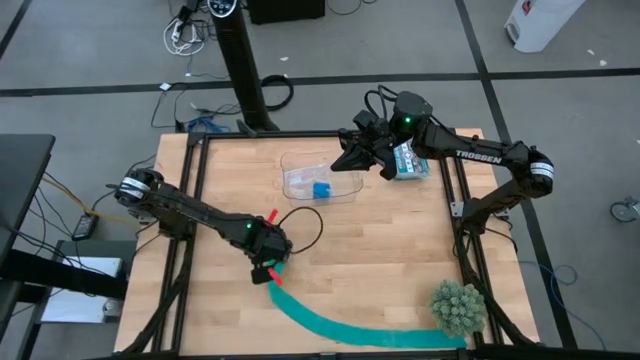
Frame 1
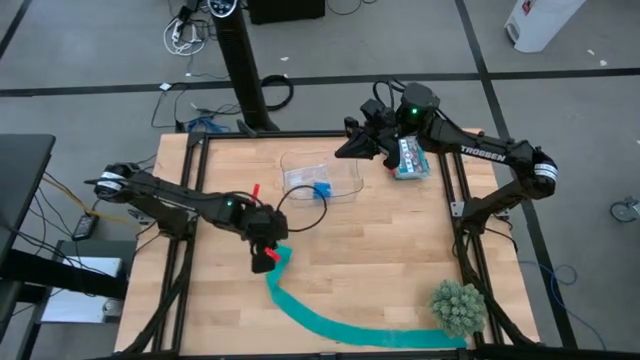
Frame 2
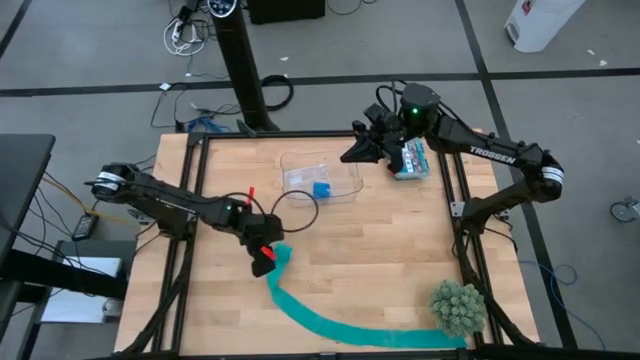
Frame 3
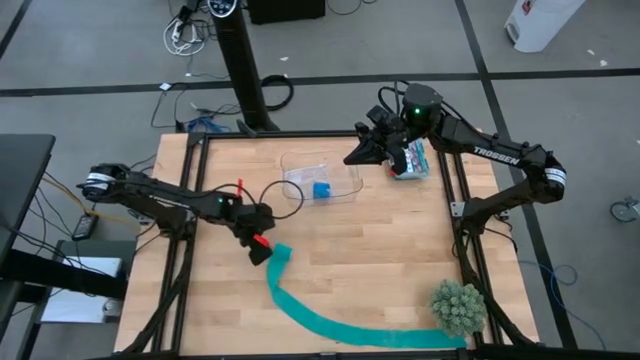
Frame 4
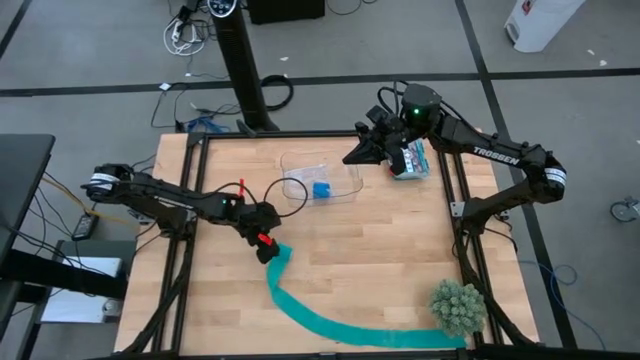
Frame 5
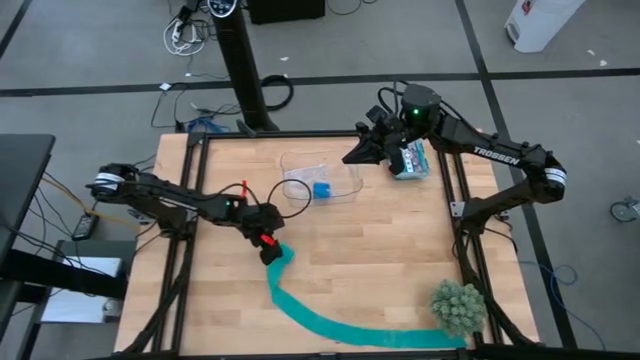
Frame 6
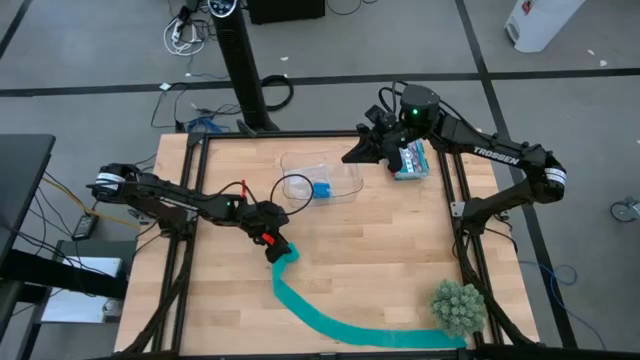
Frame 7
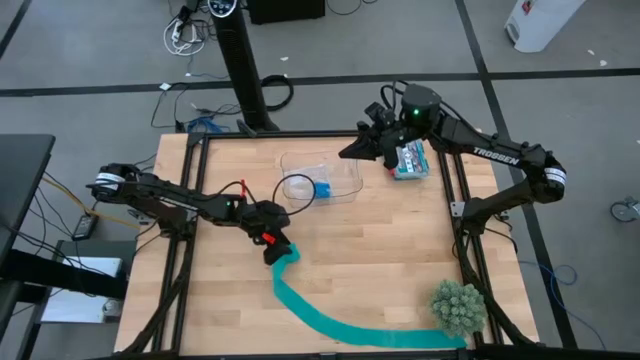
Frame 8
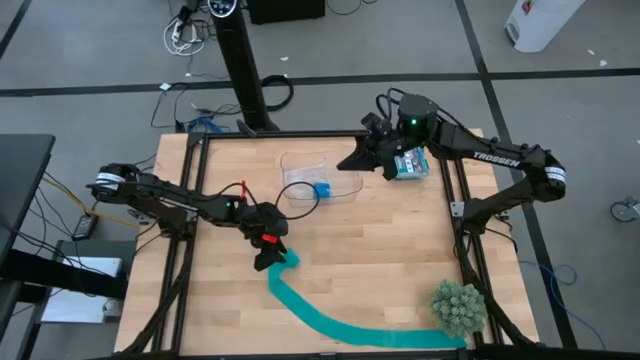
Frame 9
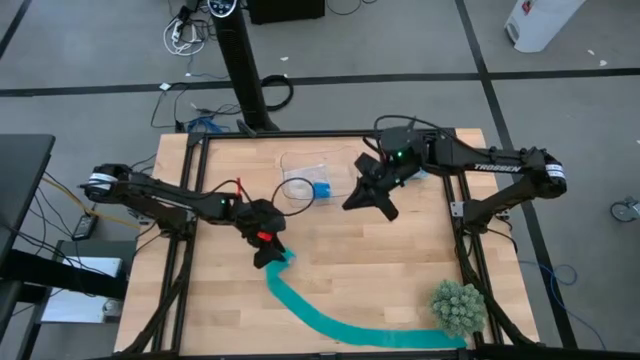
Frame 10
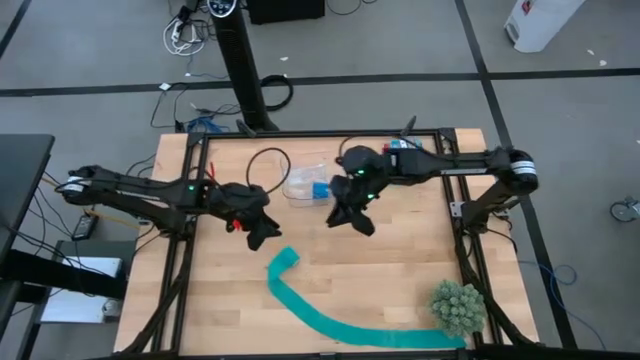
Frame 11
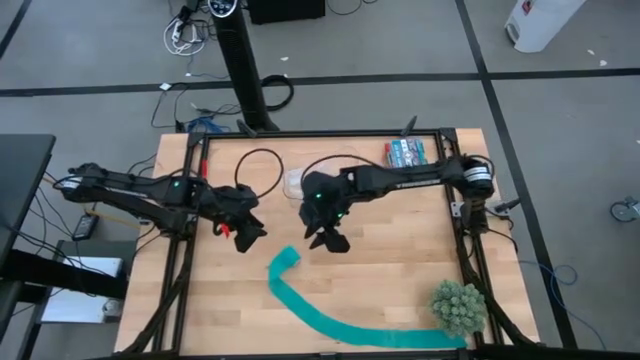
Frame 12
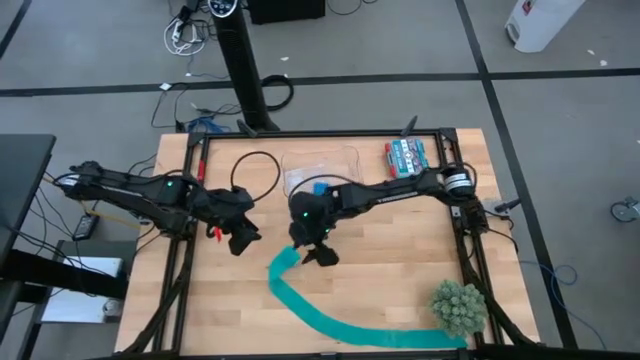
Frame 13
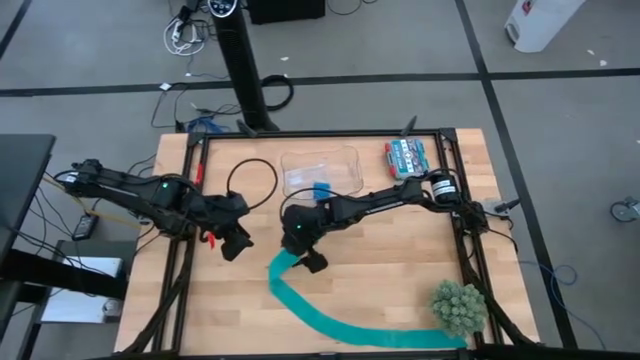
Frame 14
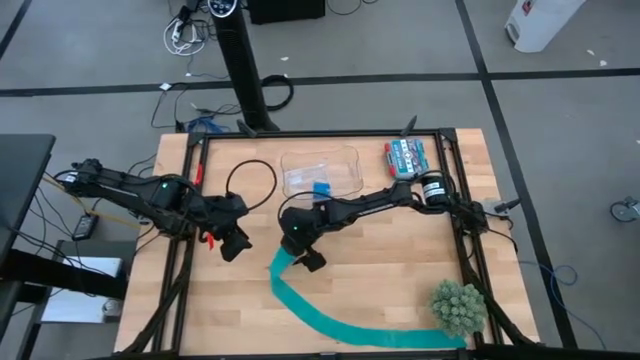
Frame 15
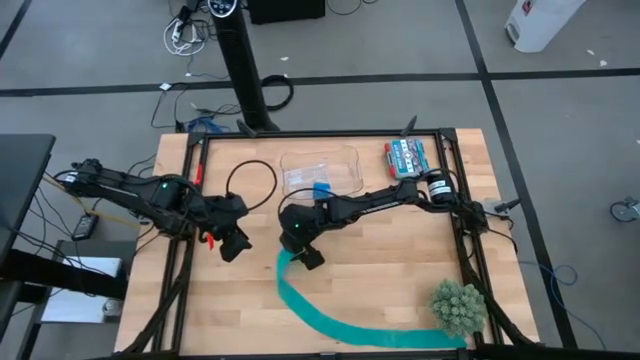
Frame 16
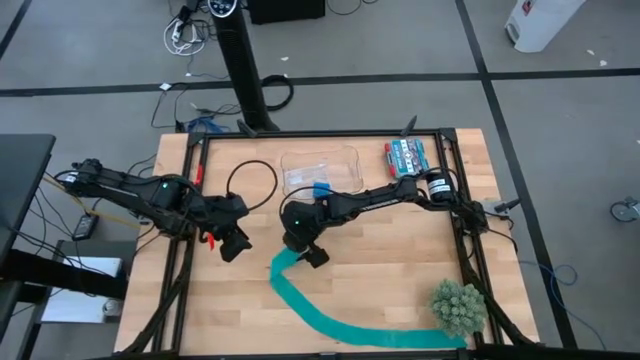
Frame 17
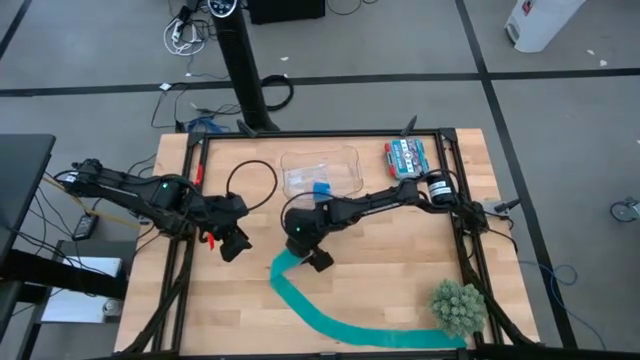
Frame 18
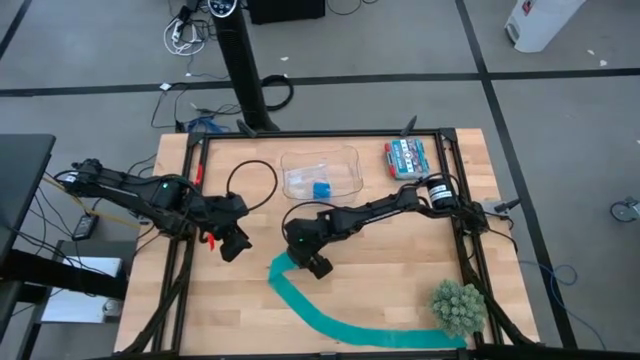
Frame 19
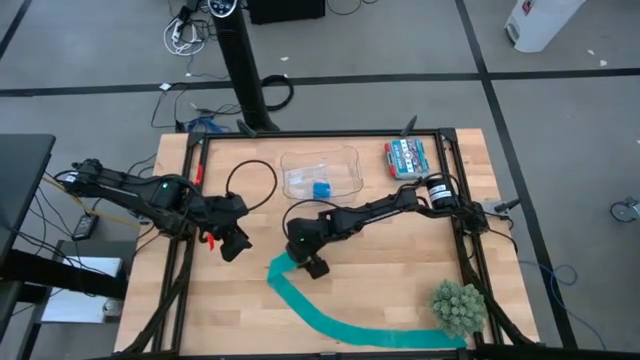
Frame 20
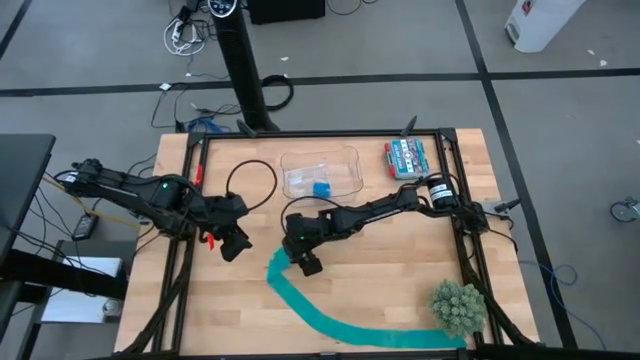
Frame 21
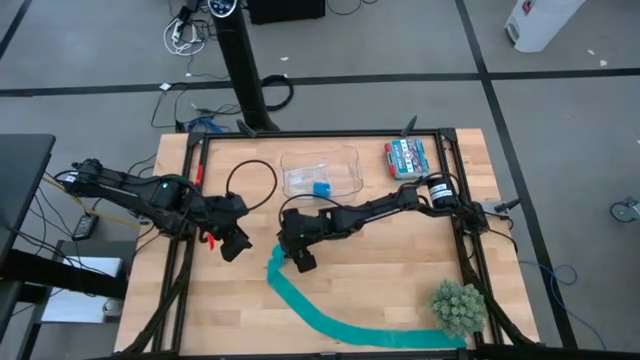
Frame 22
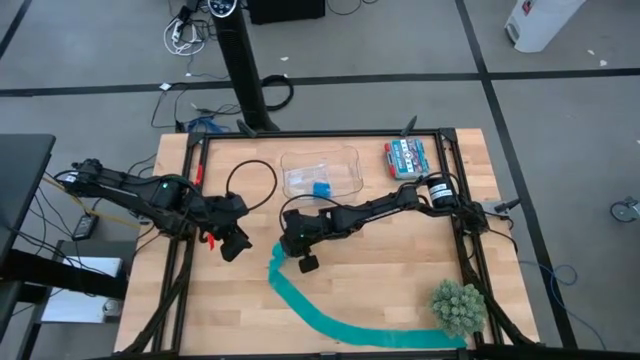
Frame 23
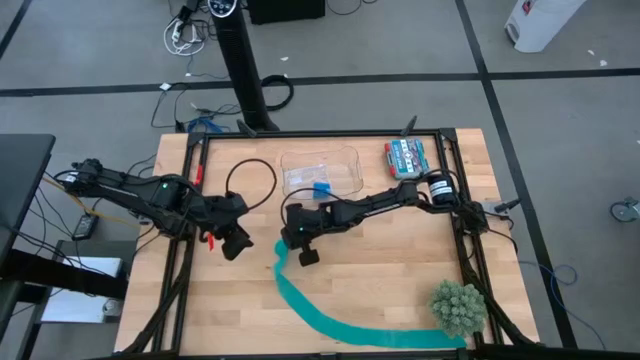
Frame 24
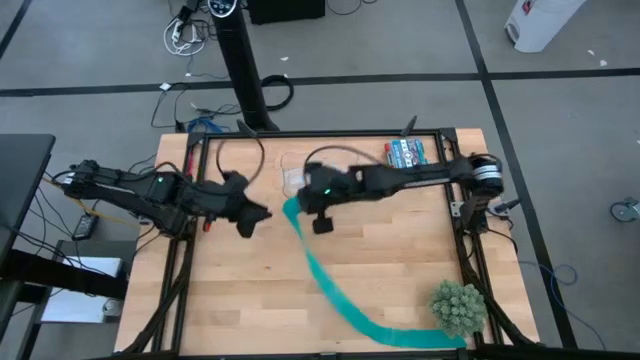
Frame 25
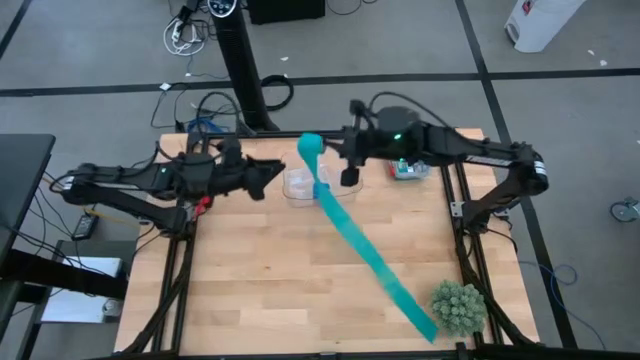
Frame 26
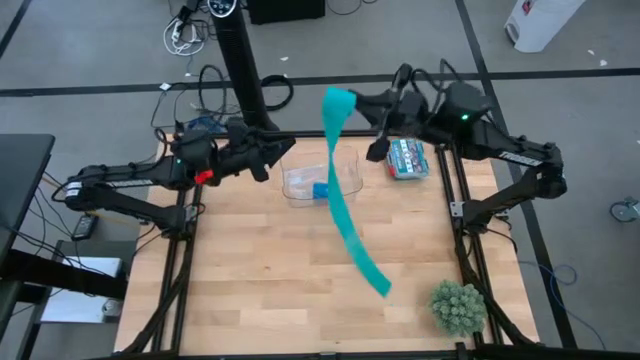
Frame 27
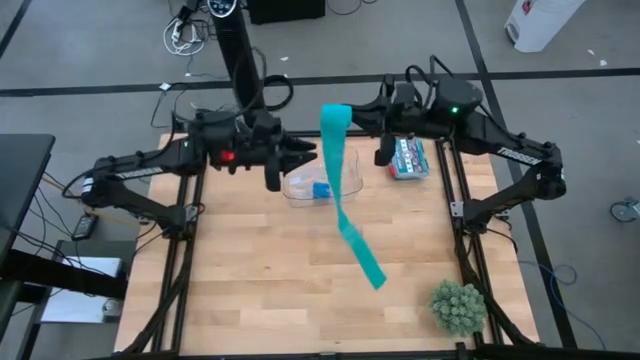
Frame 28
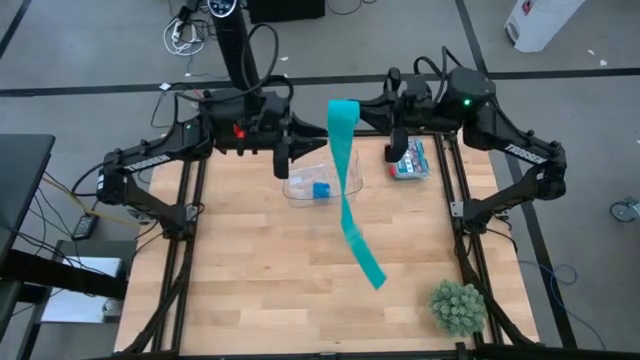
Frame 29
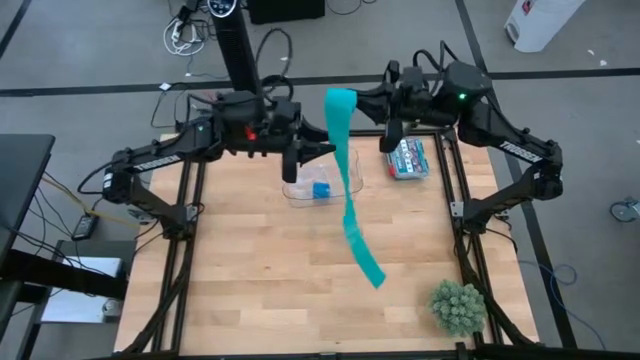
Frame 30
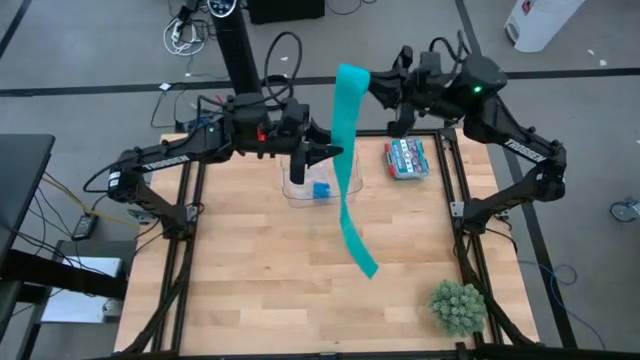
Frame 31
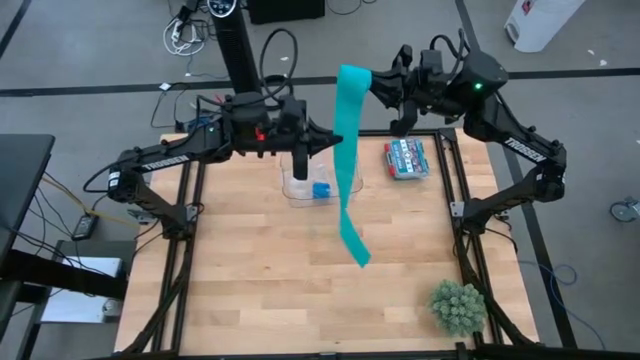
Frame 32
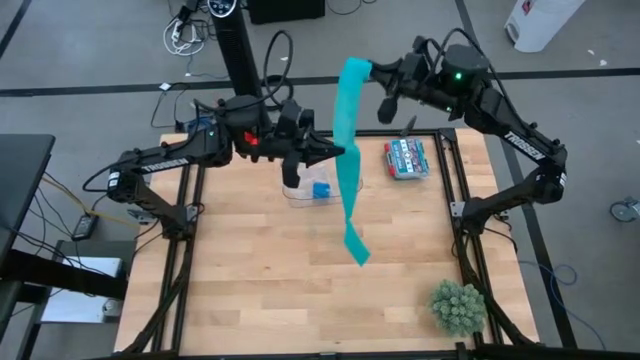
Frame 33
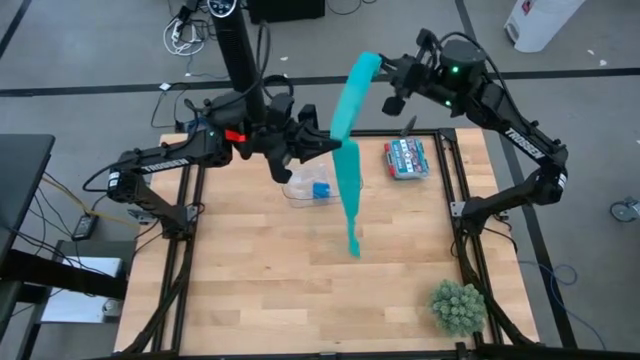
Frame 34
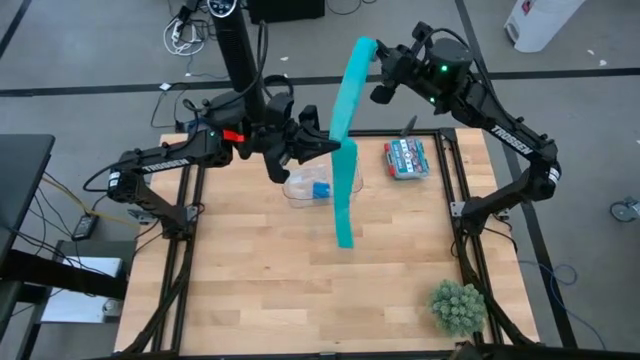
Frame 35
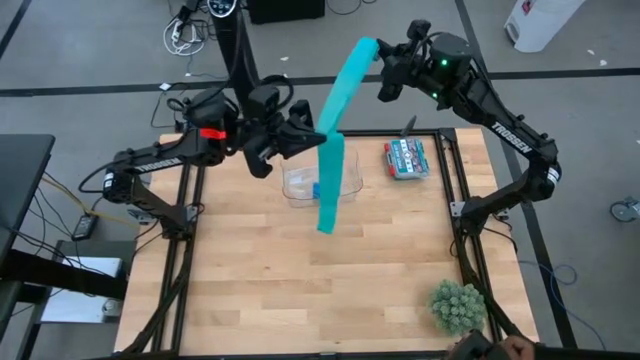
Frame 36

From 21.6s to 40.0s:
Task: Roll bandage
Roll the sky blue bandage

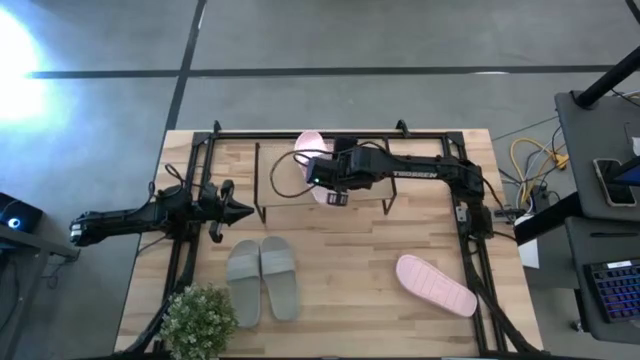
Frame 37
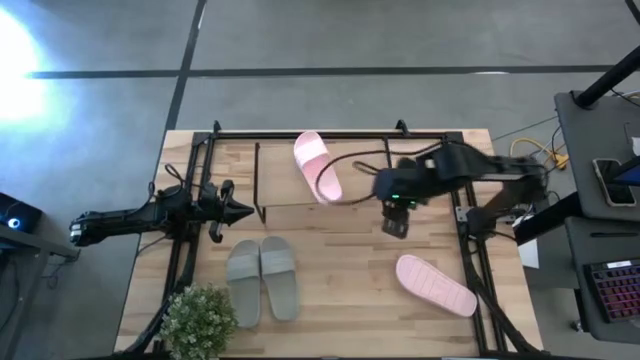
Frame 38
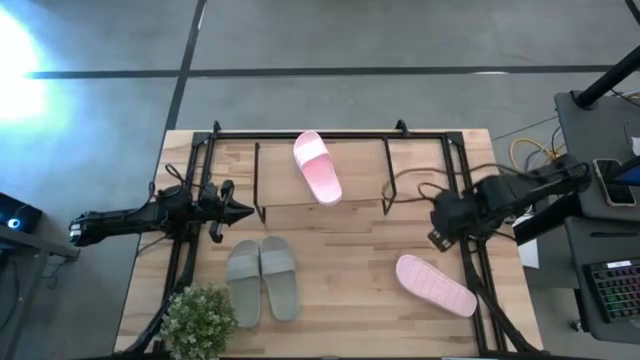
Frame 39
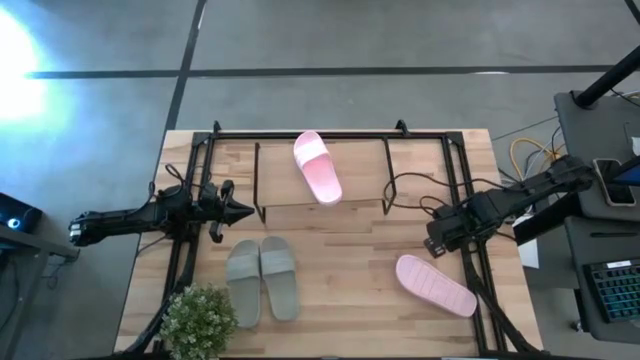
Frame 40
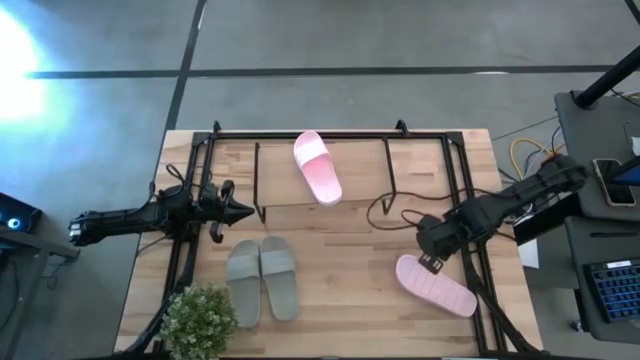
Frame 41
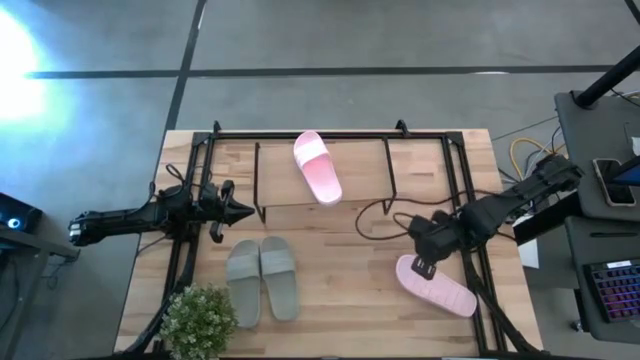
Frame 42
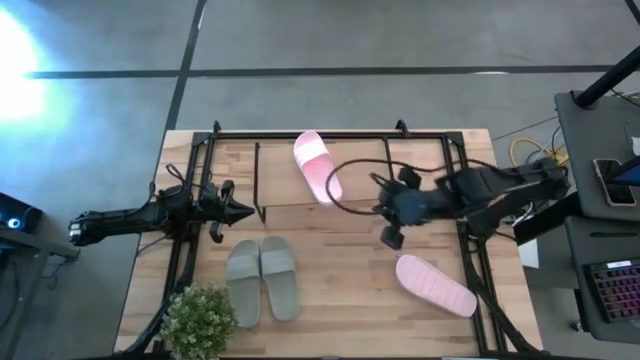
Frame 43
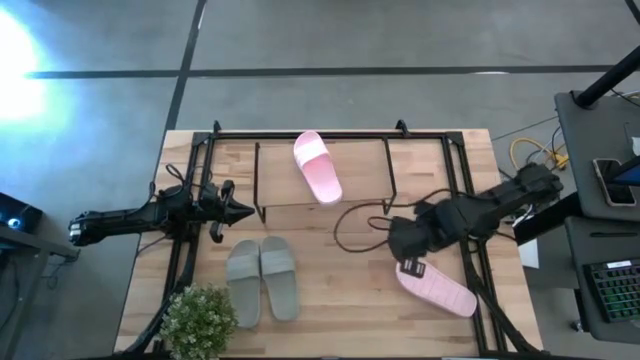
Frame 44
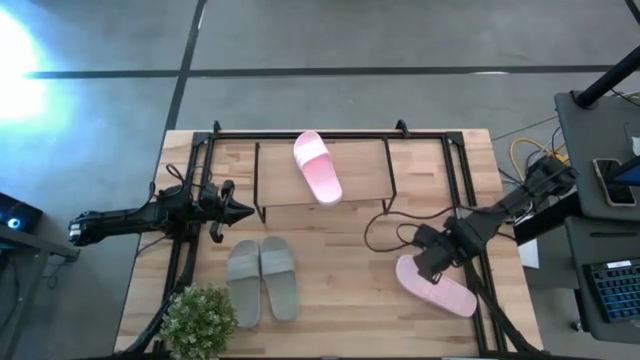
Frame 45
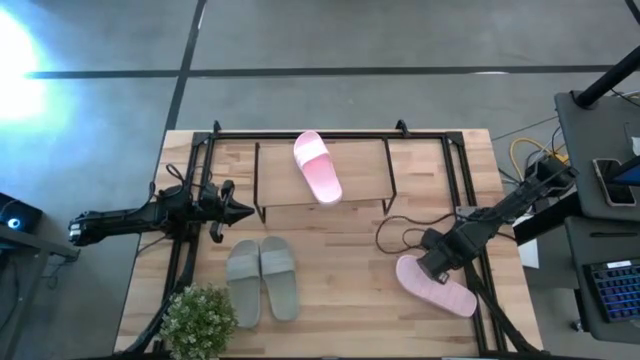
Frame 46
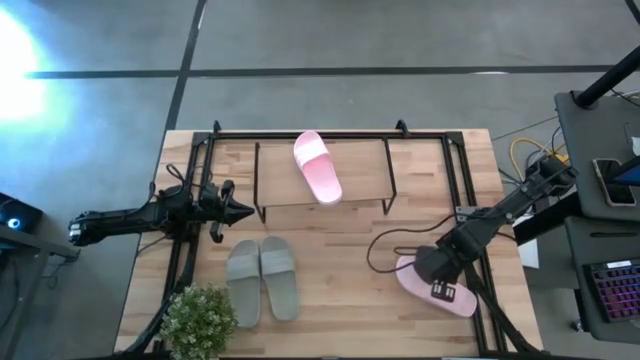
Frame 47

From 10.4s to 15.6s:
Task: Pick and place slides into the shelf
Put the pink slide on the shelf
